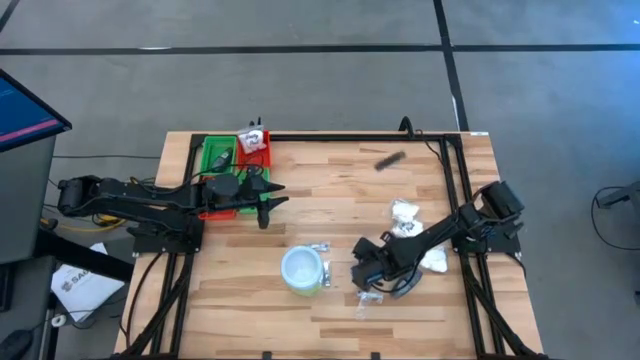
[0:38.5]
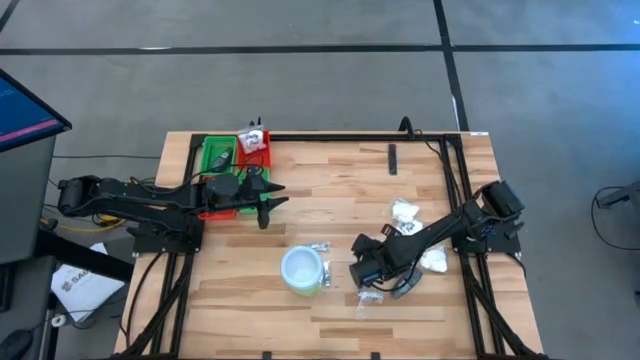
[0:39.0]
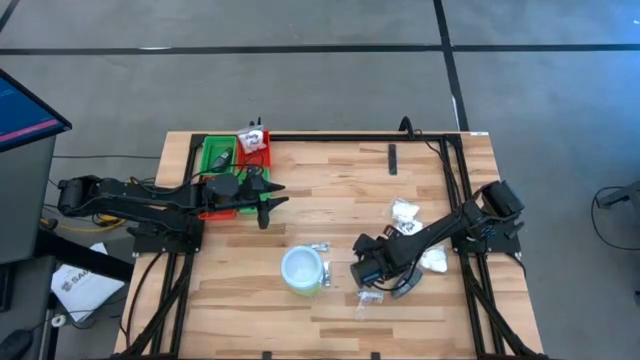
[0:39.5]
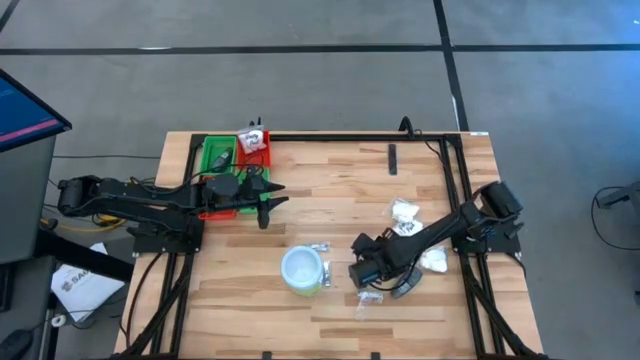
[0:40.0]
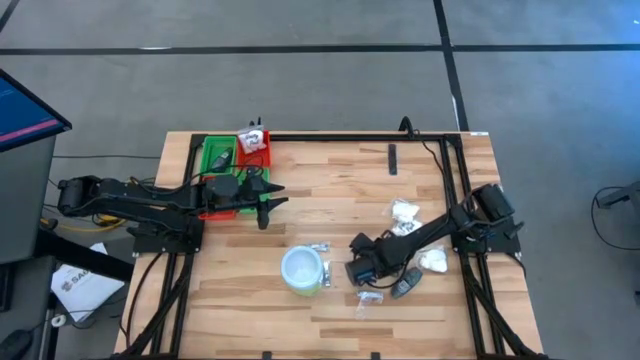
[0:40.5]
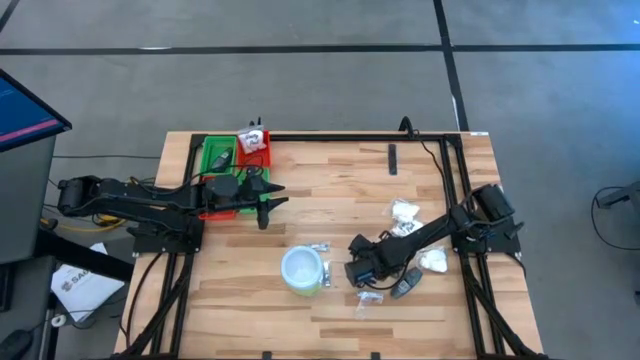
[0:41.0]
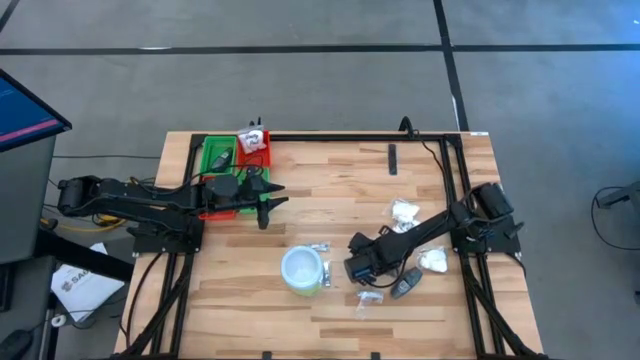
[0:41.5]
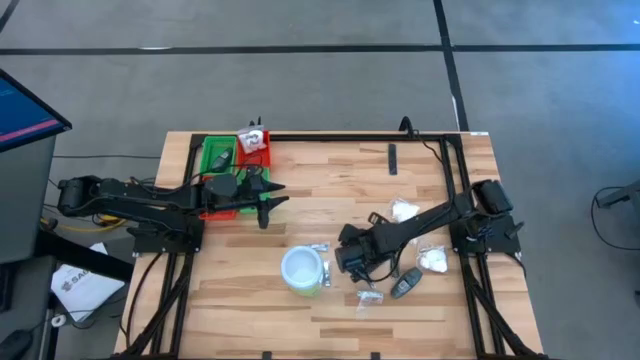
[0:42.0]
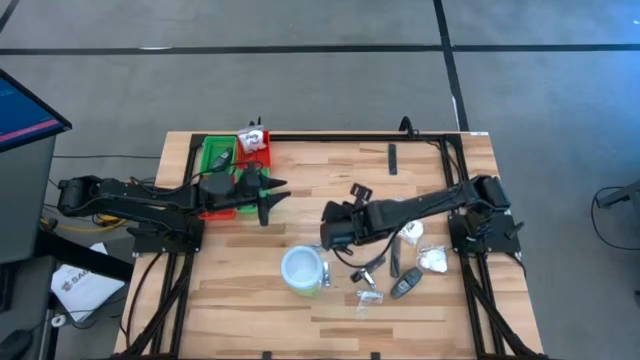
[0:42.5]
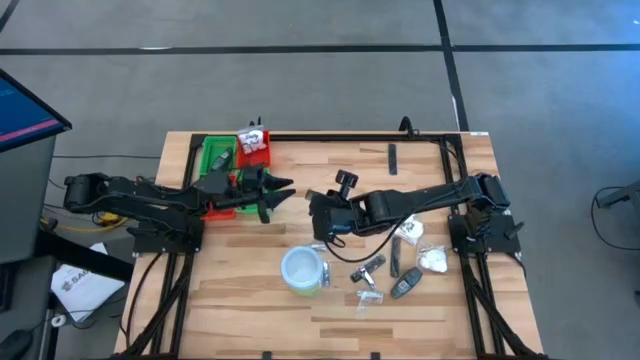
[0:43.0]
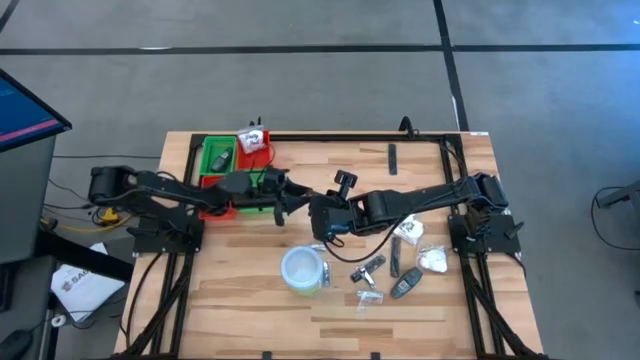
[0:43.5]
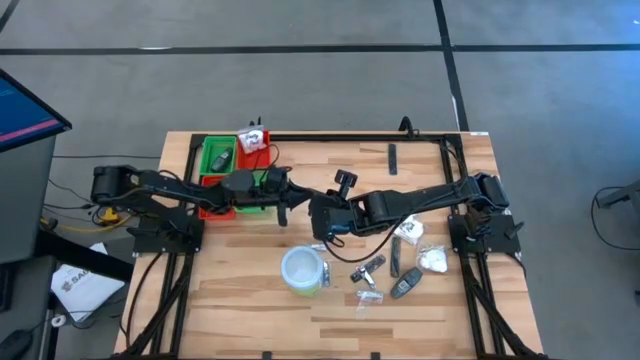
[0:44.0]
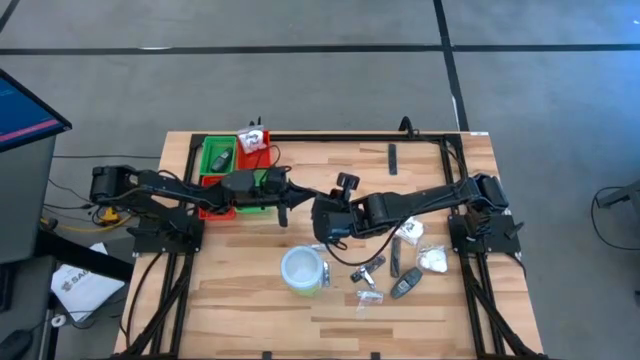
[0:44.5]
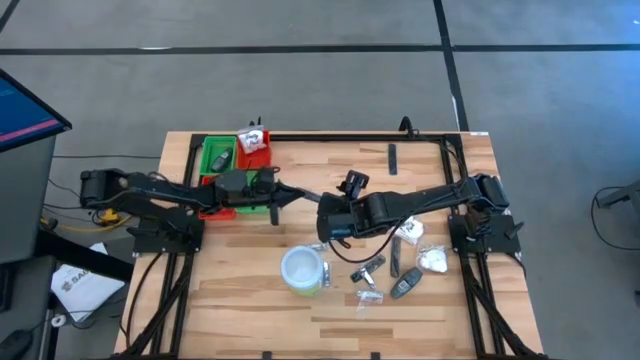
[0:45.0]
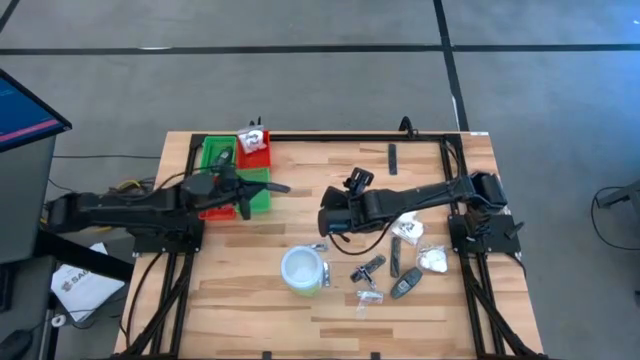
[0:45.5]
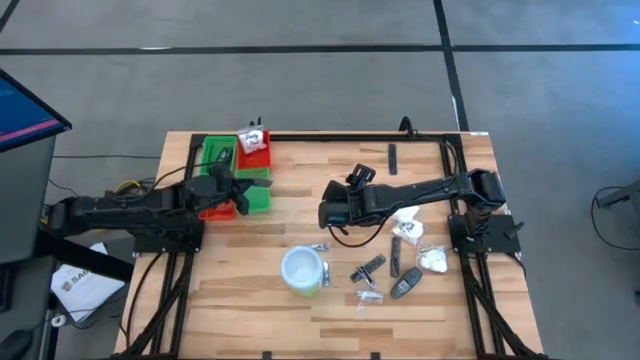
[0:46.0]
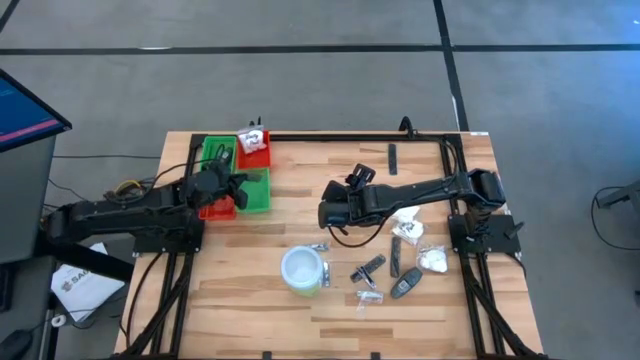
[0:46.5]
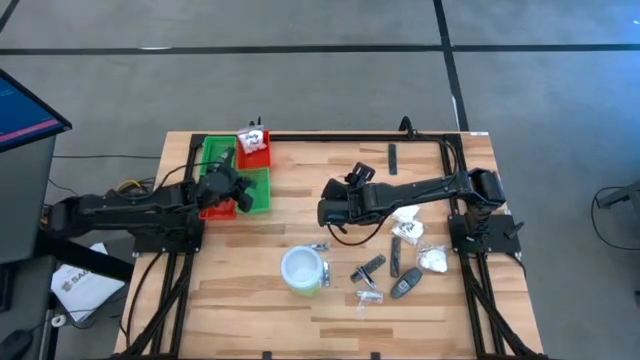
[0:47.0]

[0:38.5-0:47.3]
Task: Pick & Place Travel size toiletries
Put the black comb into the bottom green bin

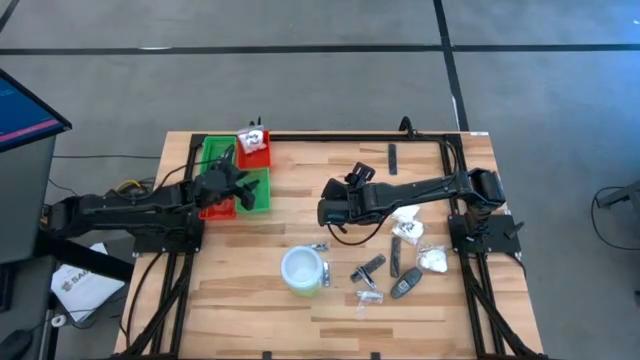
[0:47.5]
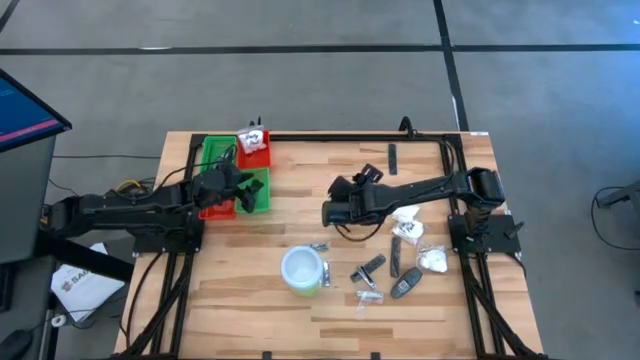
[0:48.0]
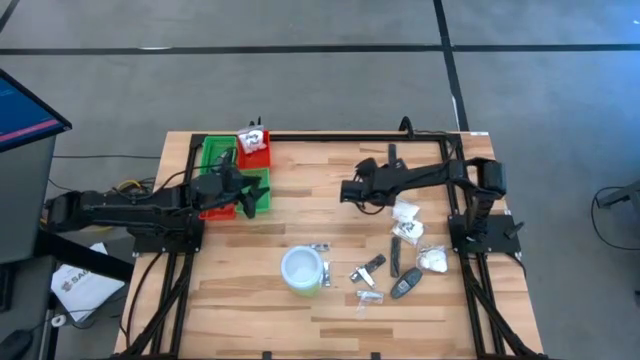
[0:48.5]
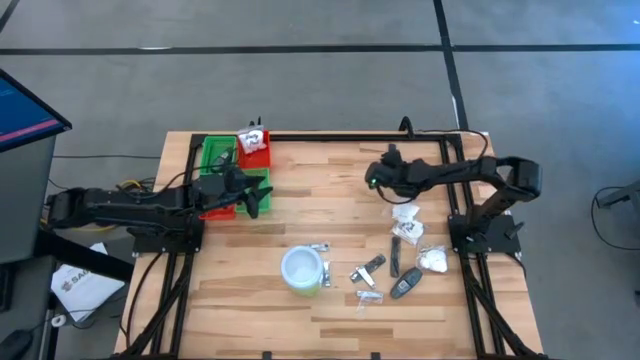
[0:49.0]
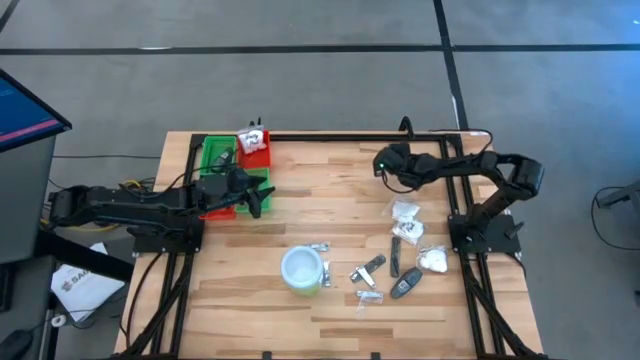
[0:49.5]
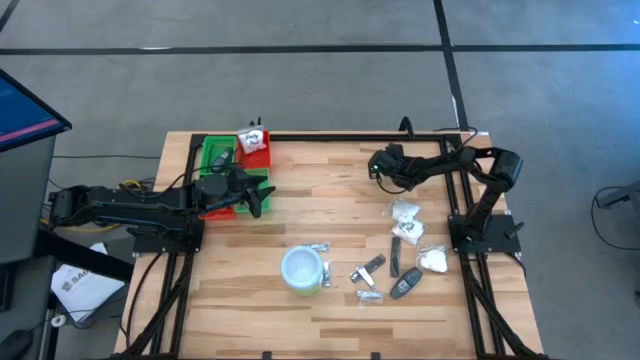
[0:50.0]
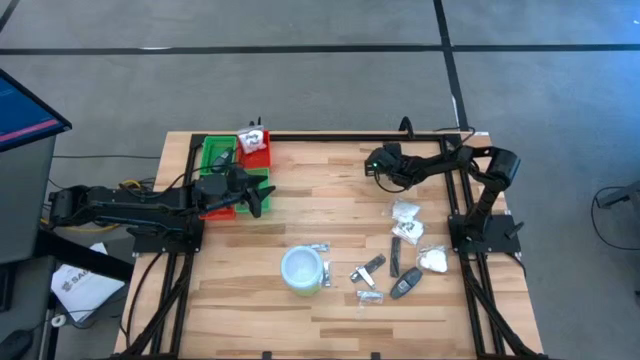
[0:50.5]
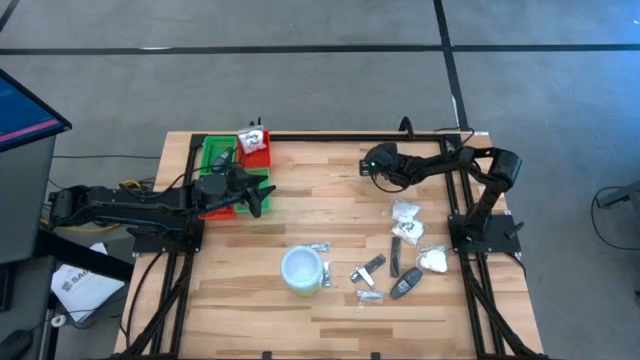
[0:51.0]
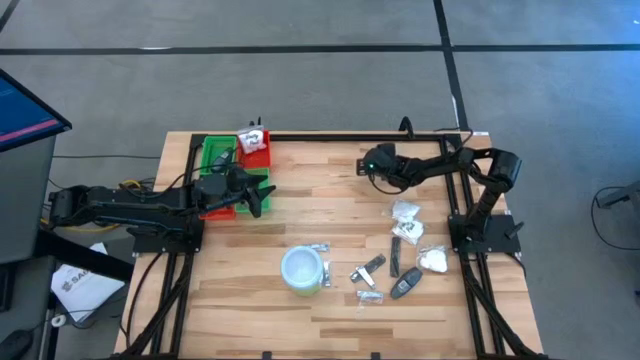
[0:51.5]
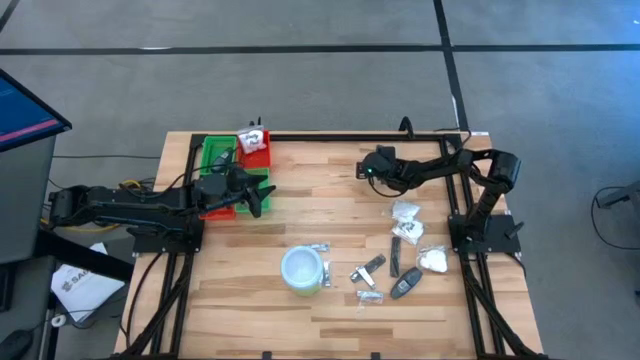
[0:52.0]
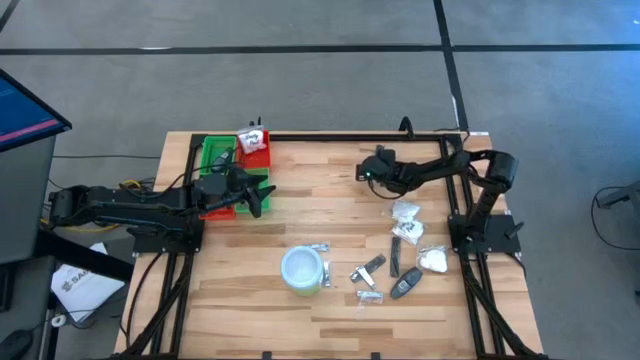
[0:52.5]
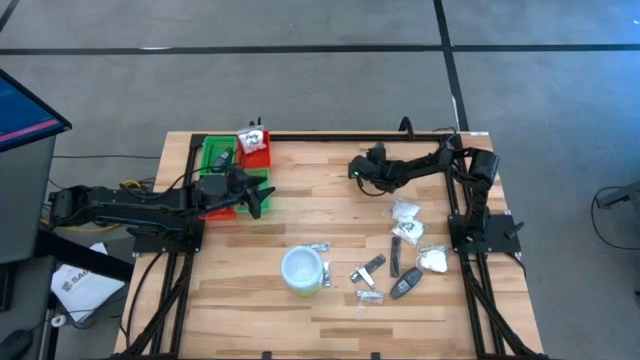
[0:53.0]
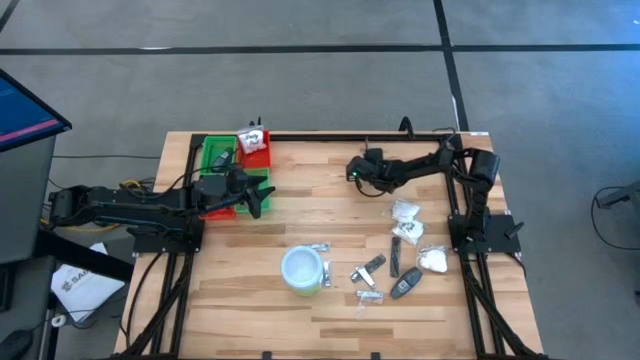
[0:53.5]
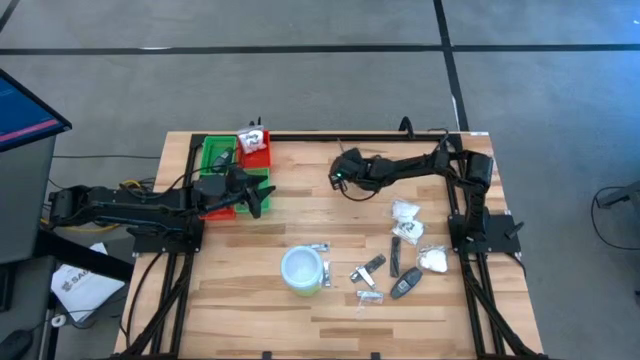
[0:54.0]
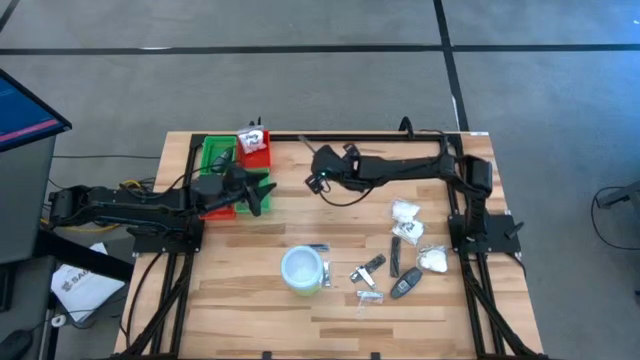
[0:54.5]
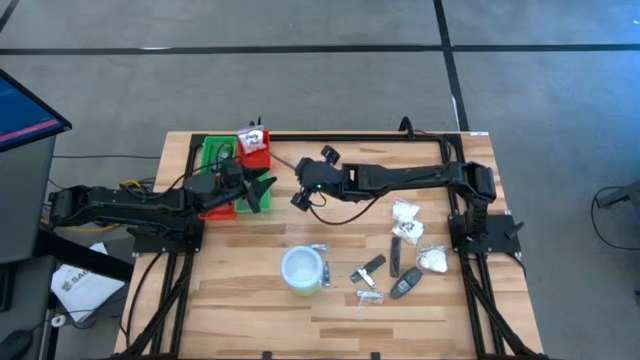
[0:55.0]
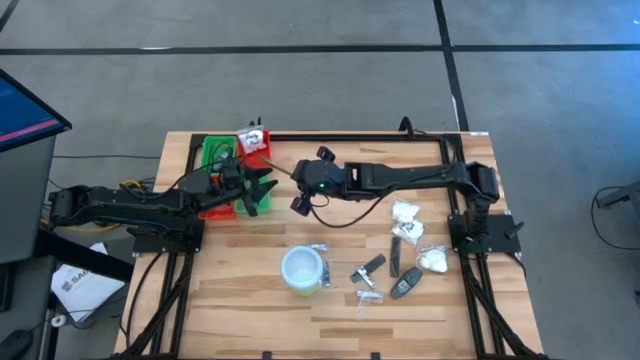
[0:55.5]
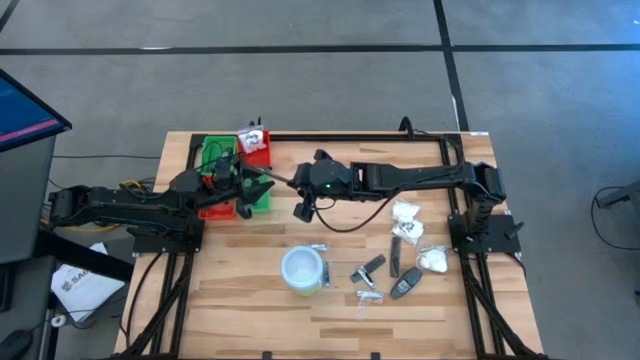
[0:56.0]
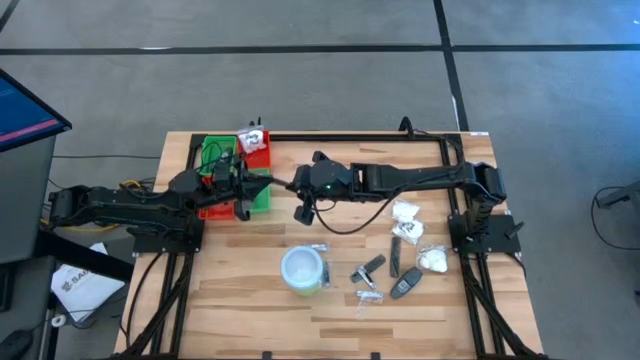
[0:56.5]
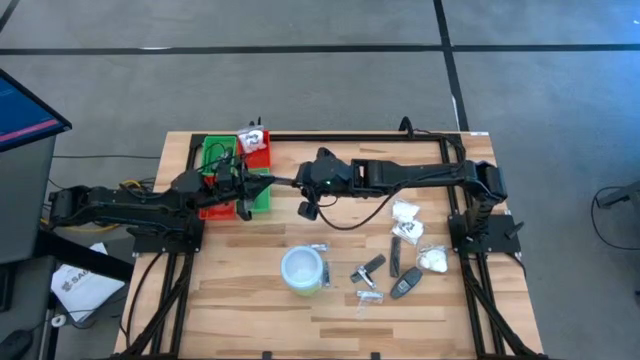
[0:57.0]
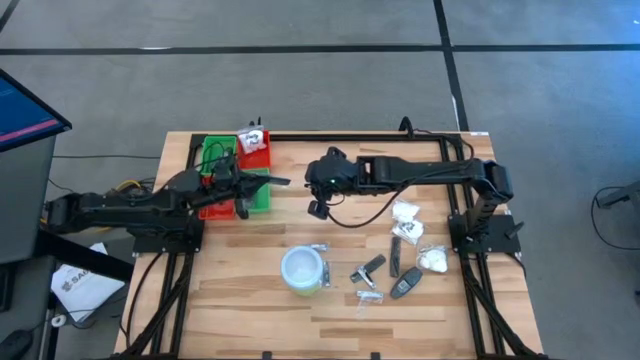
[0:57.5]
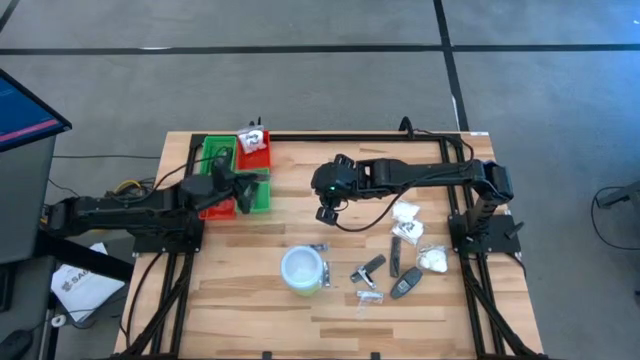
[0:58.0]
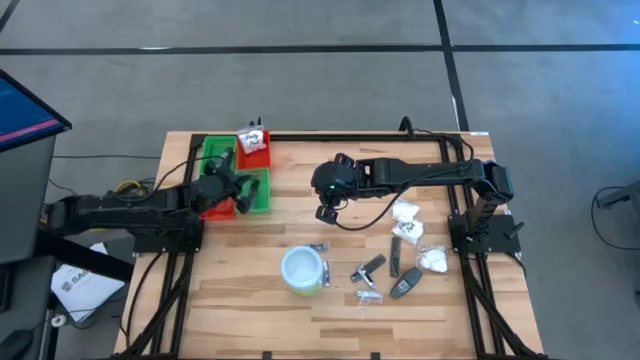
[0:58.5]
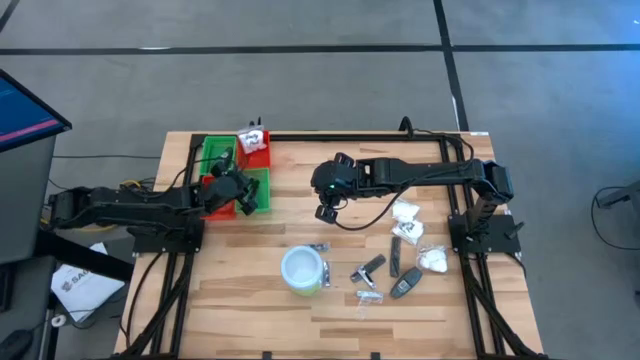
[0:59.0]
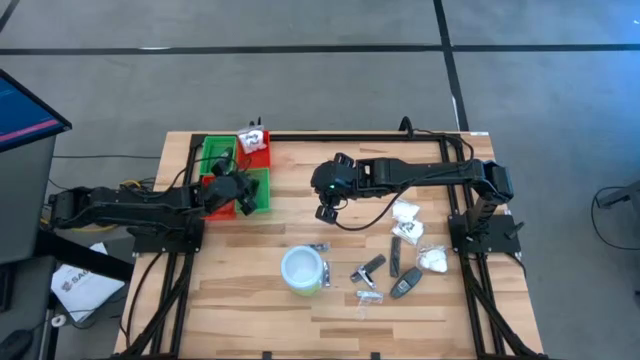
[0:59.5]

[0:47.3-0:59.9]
Put the black comb into the bottom green bin
